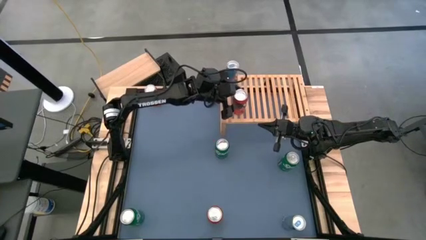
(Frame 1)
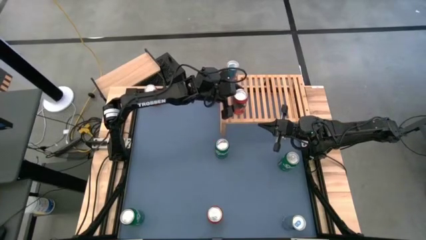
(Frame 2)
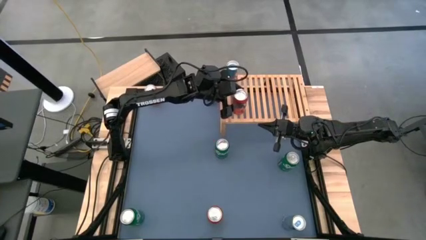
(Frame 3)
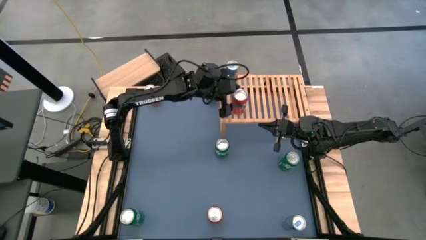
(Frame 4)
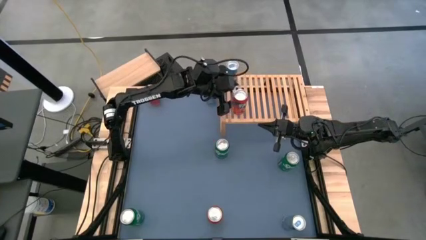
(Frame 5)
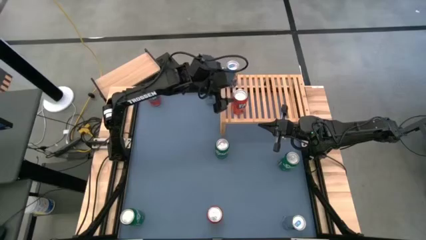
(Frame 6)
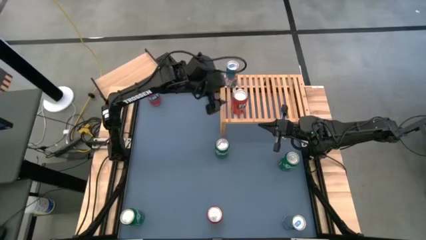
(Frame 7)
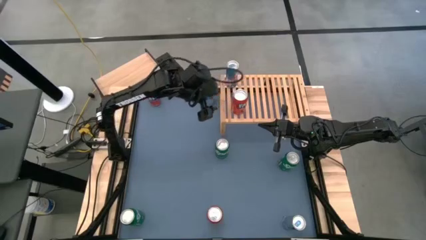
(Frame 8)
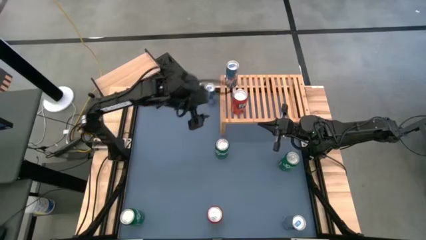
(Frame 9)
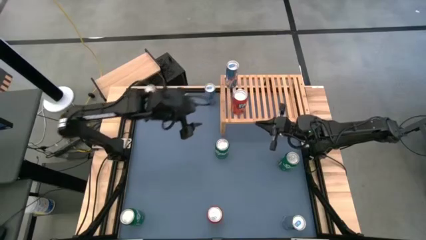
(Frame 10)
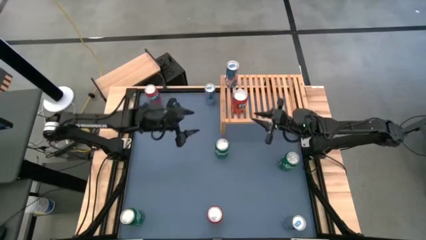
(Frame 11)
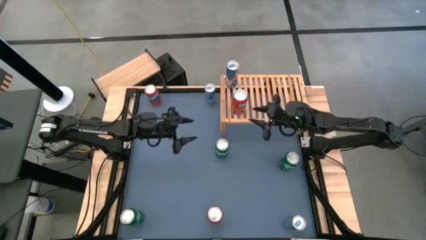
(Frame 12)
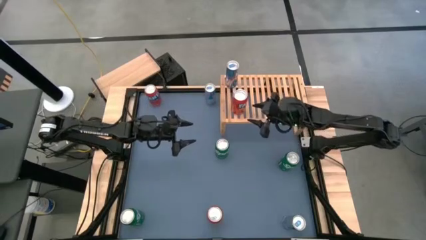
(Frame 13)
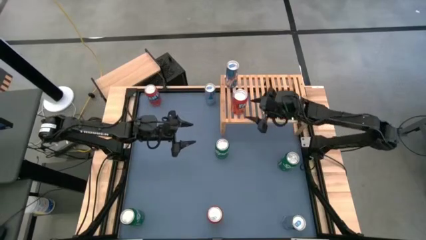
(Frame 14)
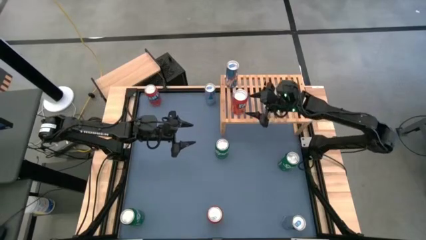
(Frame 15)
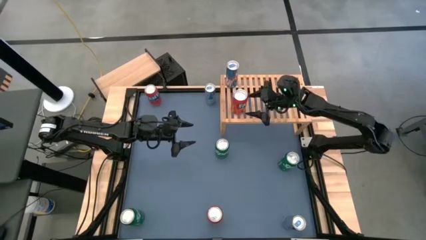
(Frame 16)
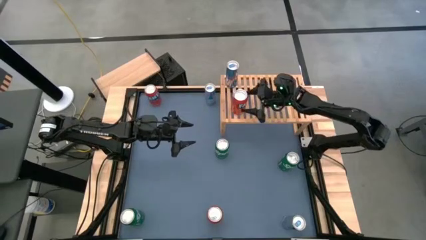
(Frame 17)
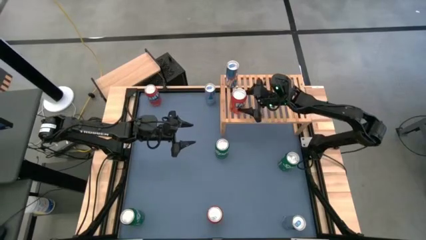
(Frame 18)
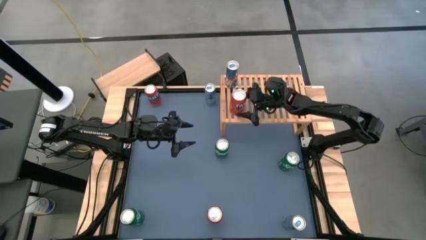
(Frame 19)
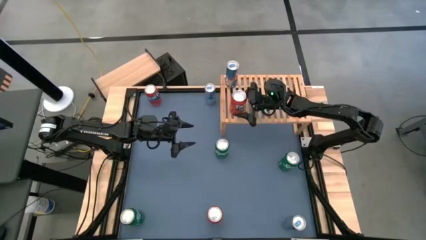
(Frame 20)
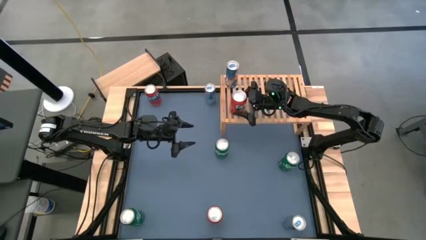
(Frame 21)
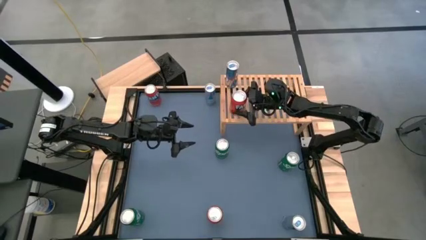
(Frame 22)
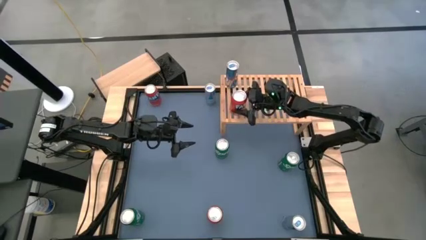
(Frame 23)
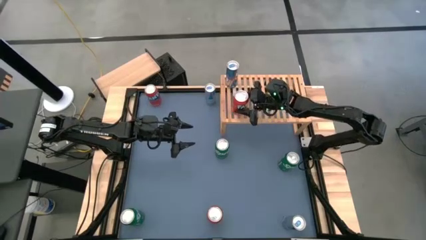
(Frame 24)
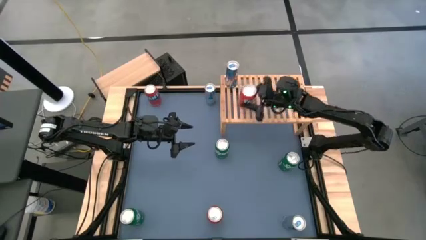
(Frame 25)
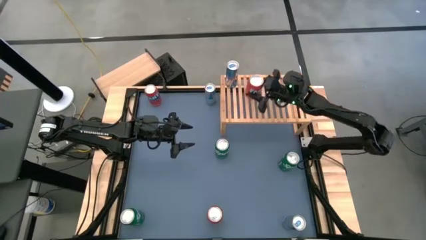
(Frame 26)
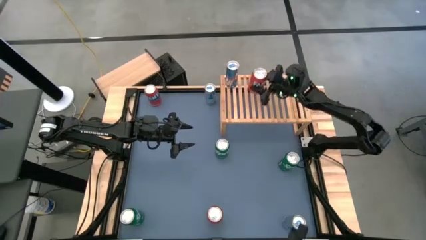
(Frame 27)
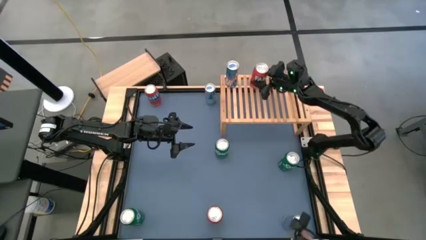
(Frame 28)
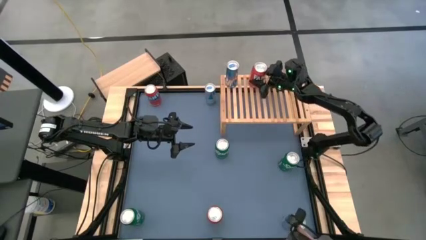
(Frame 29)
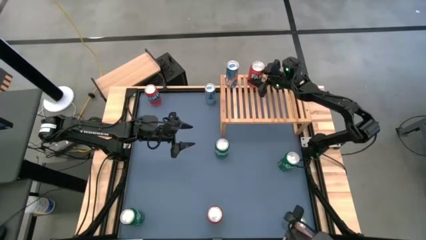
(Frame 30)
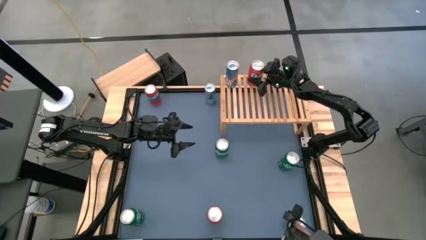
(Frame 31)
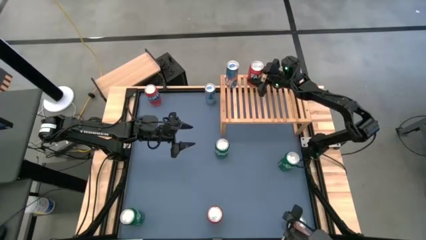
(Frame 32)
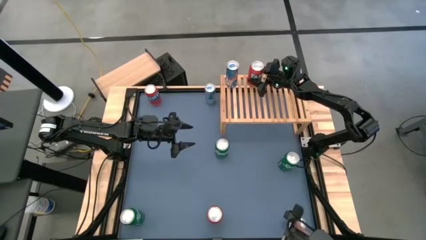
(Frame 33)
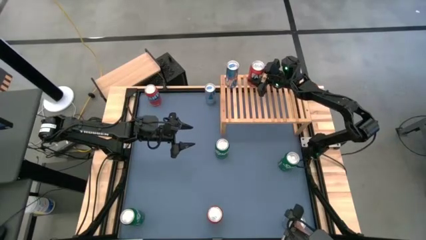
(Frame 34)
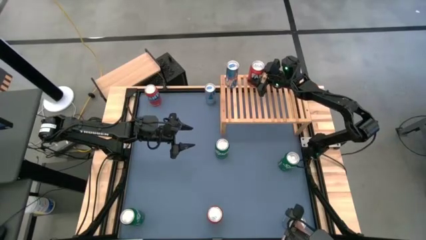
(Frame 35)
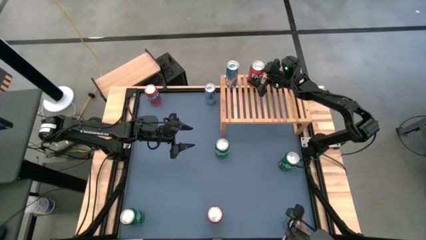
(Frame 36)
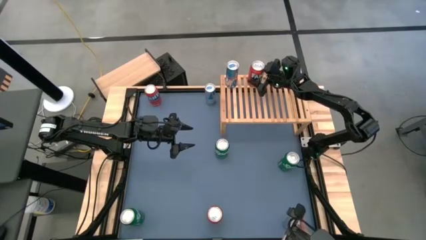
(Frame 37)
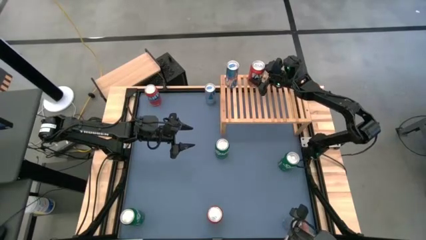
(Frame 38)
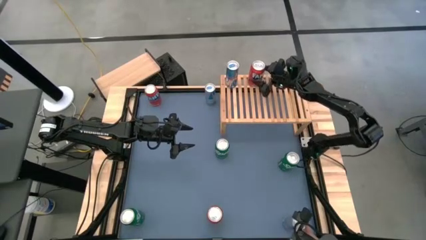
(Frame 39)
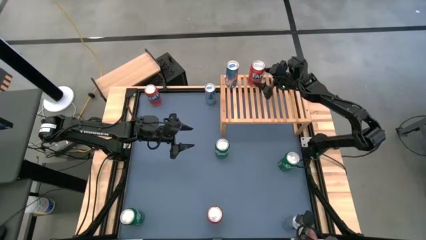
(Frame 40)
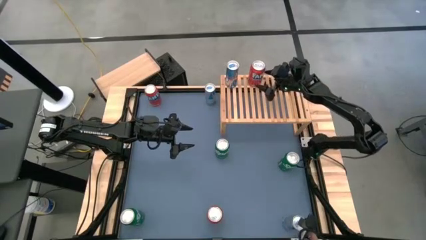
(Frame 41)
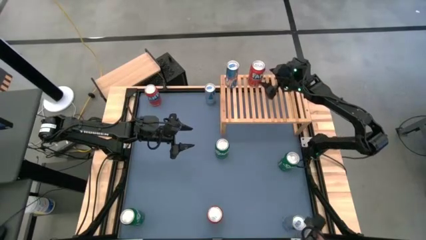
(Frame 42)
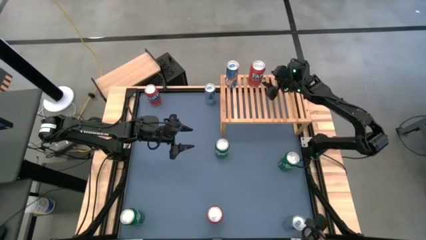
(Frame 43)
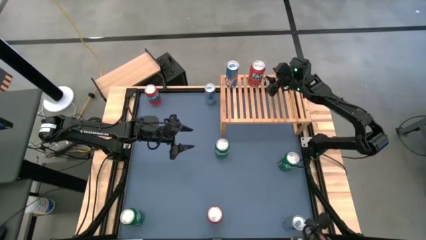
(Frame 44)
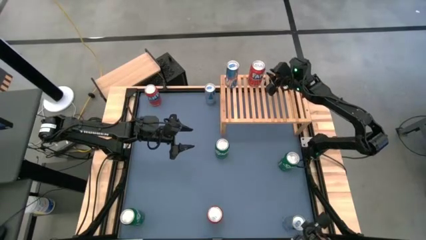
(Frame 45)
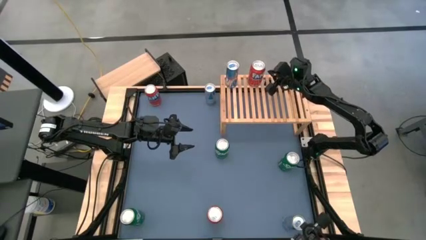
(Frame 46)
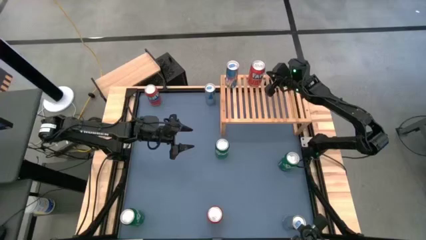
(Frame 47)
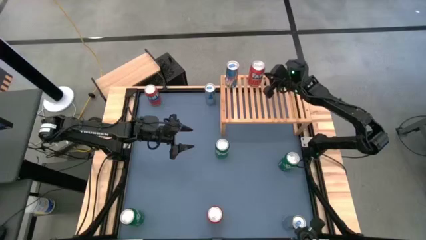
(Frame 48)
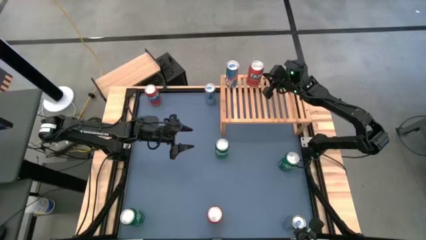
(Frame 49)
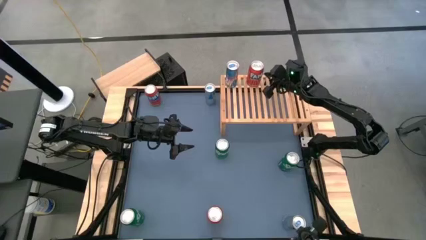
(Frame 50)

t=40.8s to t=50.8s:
Task: Place canned beverage on shelf
Put the middle right red soda can on the shelf
